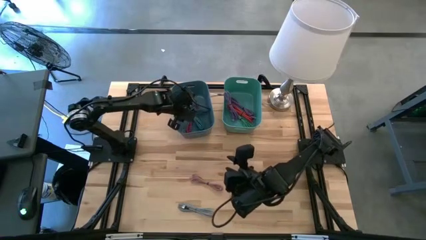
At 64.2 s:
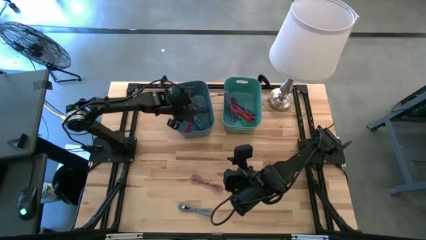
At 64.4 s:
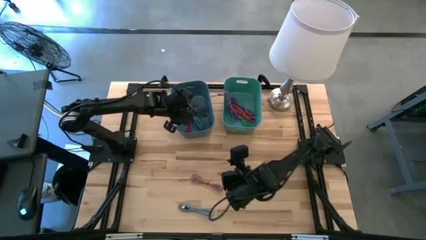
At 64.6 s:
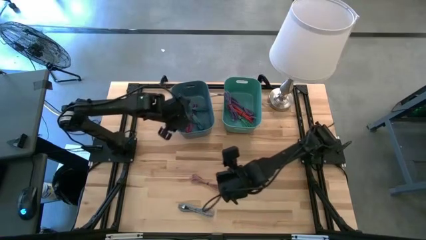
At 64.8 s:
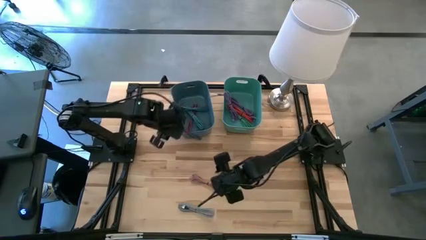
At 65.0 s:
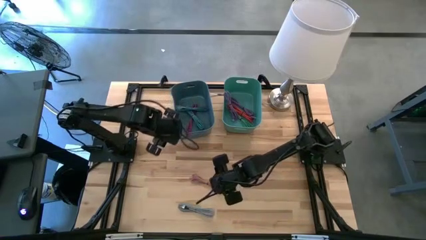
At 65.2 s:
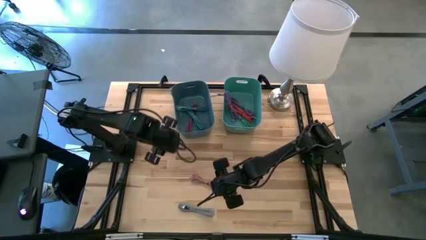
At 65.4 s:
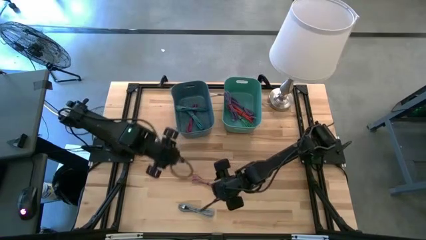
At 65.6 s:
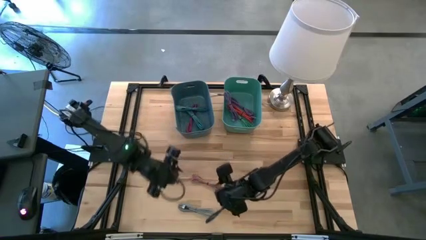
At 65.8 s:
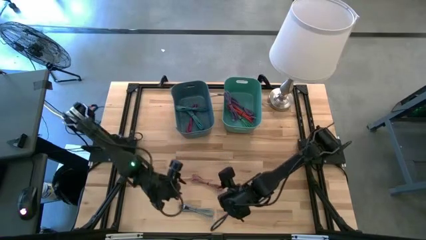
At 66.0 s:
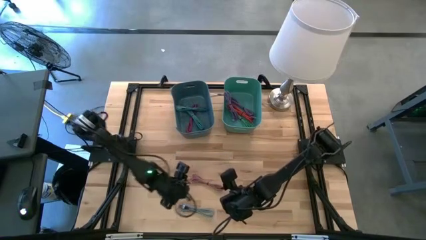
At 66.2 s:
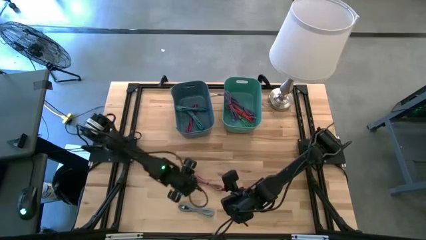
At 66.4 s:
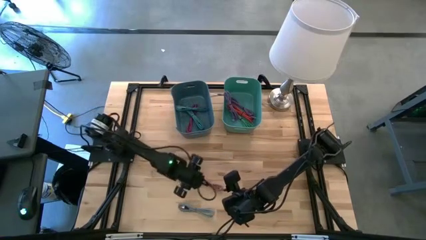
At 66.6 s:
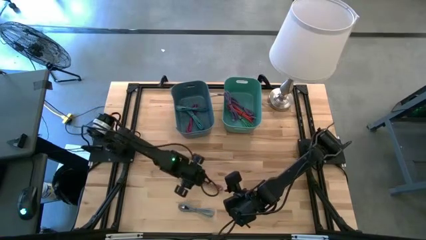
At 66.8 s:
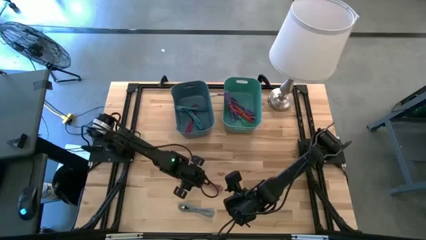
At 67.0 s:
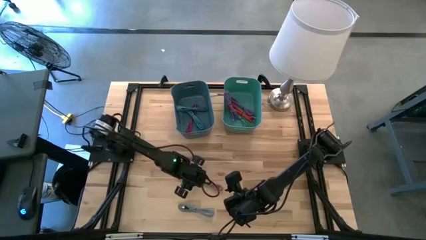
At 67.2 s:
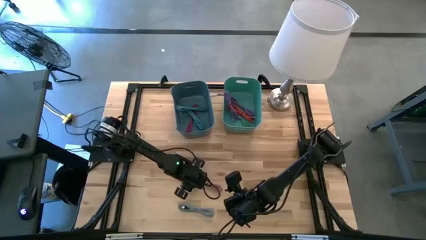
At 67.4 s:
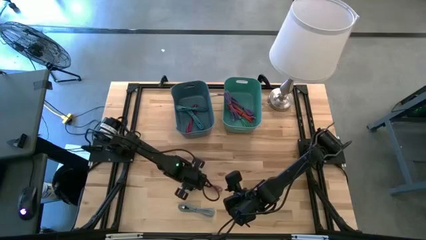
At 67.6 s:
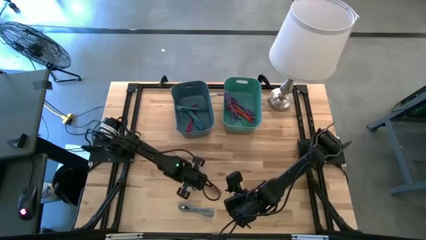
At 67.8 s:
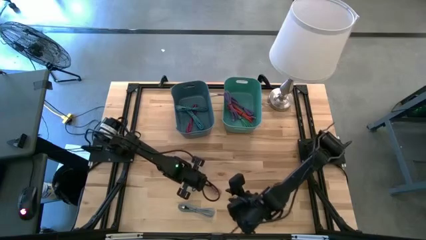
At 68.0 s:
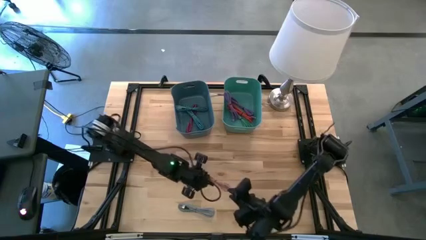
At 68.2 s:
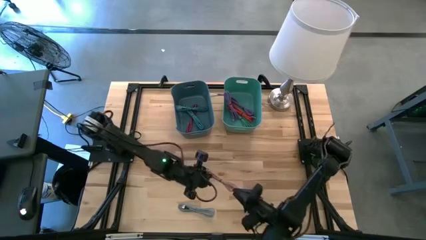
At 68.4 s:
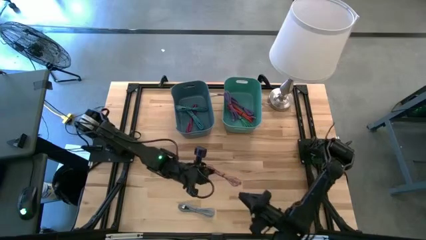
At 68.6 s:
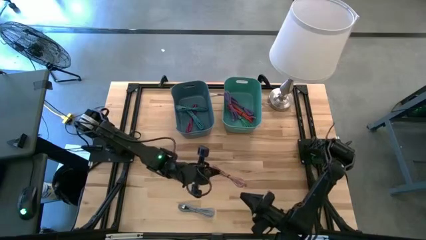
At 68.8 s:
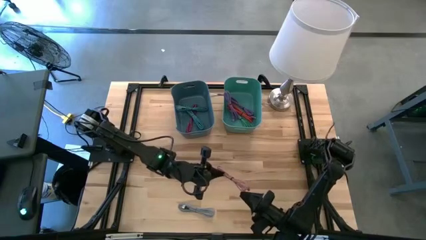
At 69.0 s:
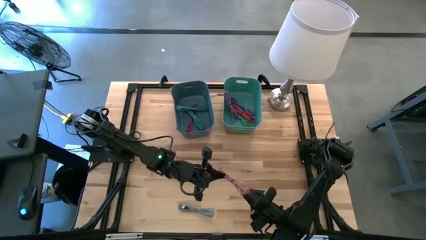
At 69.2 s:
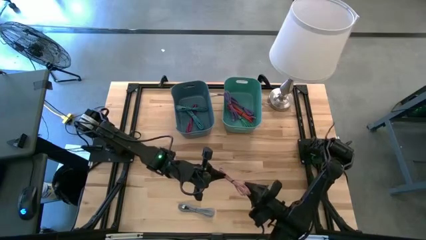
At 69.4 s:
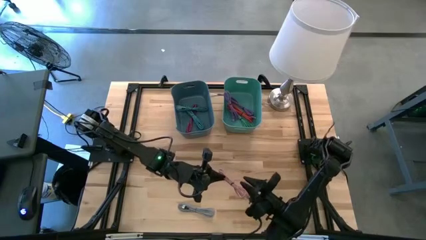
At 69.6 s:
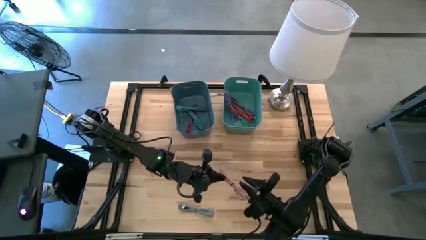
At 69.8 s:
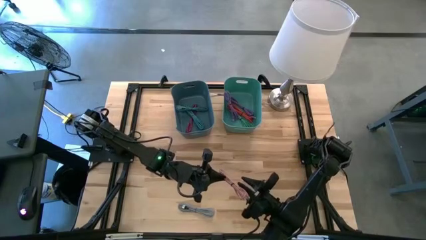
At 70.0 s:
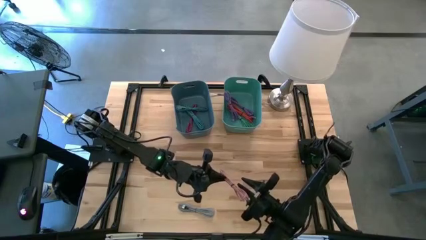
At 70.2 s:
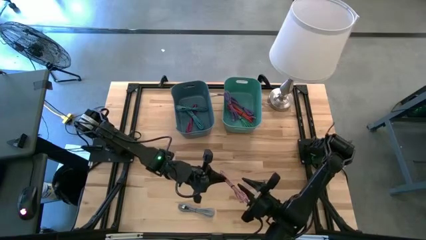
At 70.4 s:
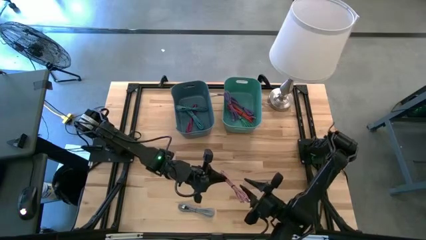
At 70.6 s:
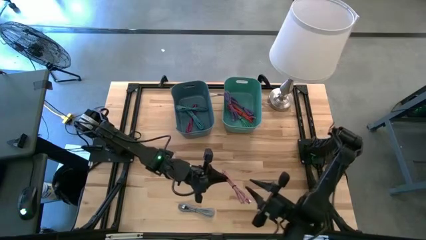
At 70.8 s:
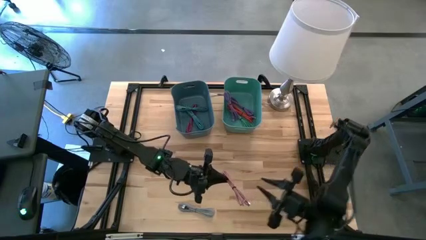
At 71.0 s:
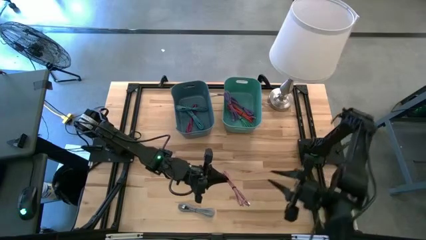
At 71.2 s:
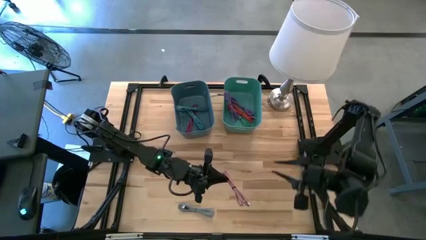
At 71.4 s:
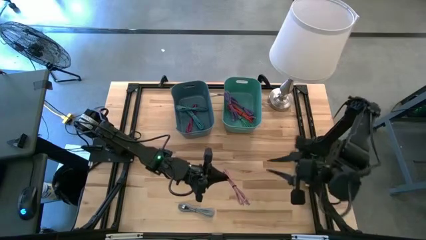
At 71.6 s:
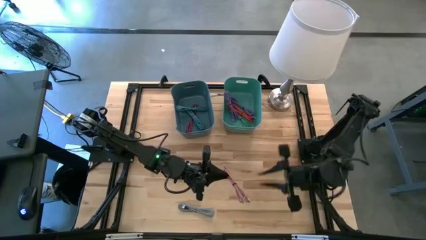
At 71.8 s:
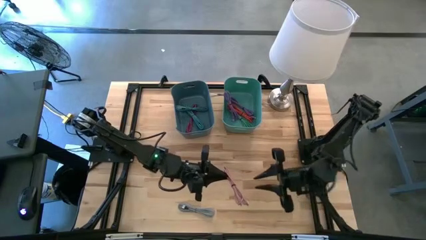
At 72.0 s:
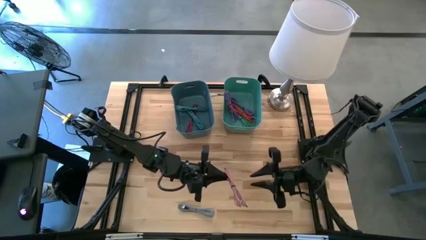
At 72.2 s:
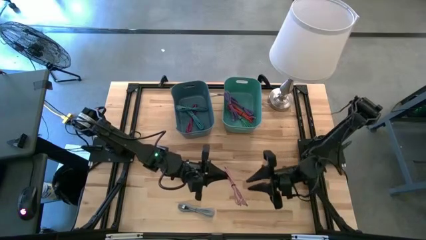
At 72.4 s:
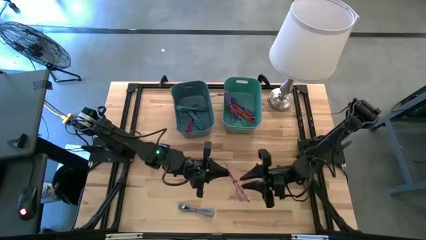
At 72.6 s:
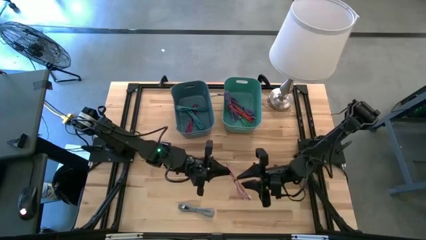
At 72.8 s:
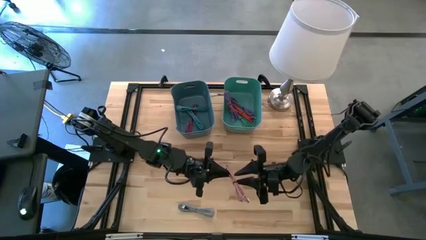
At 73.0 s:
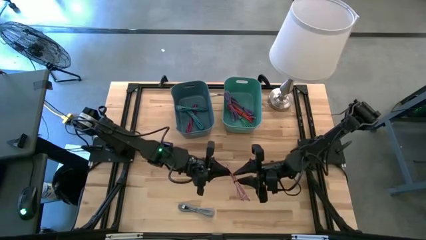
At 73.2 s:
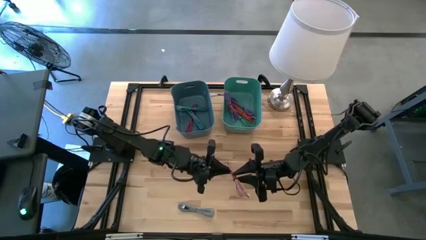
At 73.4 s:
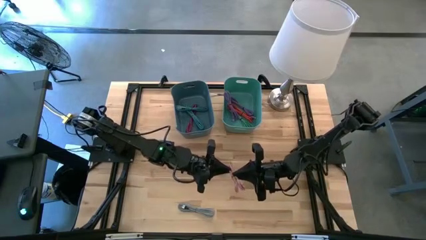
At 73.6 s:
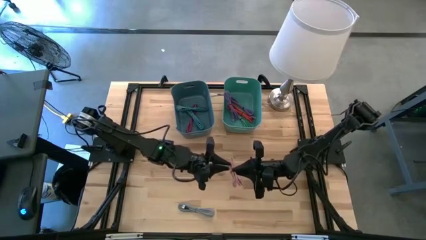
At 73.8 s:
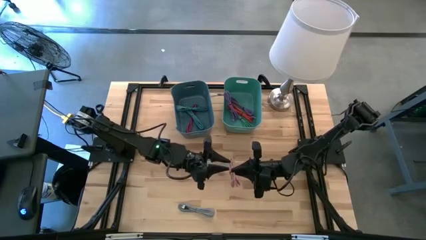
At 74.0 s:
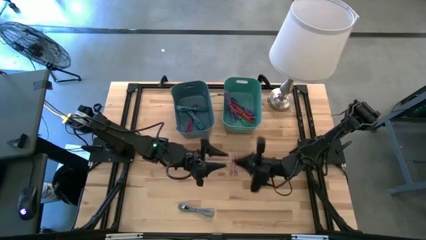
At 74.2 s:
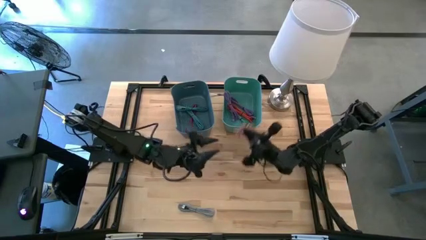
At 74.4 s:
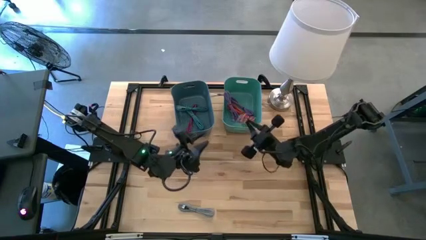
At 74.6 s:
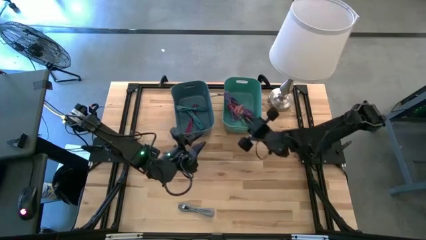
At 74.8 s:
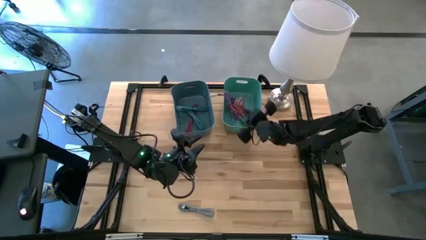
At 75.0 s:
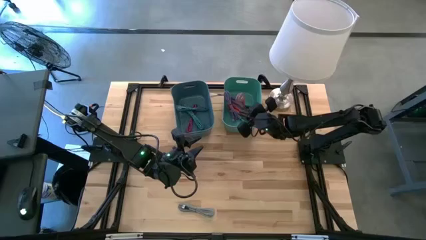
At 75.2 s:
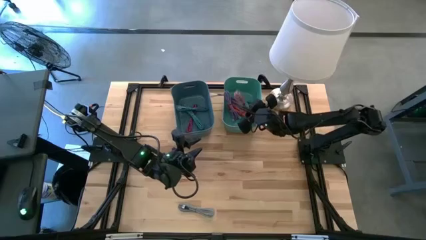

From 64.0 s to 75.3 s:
Task: Pick & Place USB Port
Put the pink charger cable into the green bin

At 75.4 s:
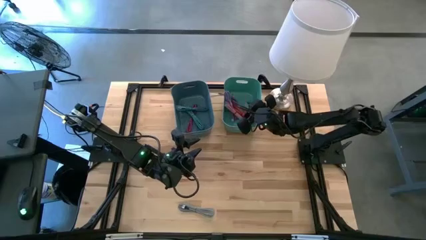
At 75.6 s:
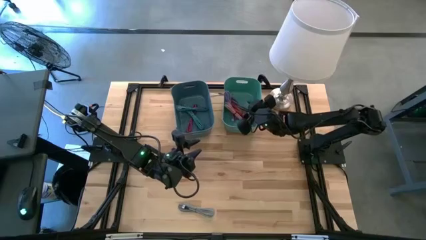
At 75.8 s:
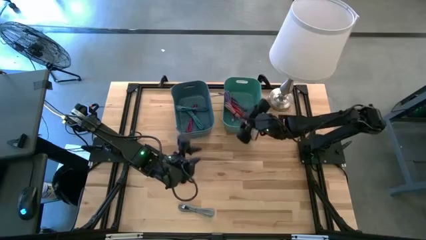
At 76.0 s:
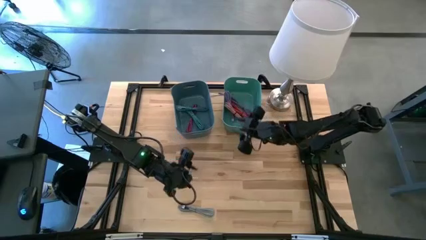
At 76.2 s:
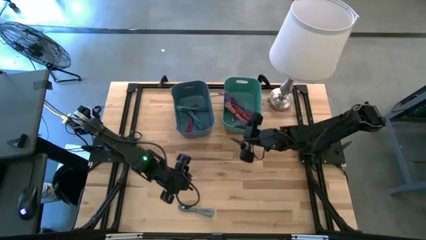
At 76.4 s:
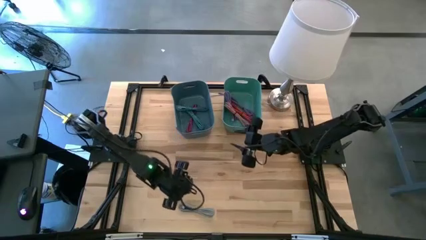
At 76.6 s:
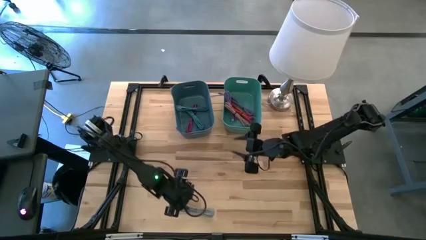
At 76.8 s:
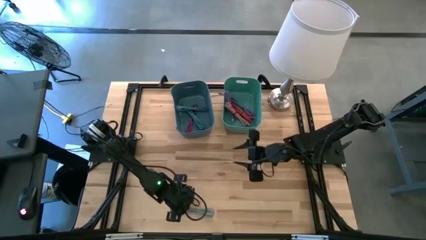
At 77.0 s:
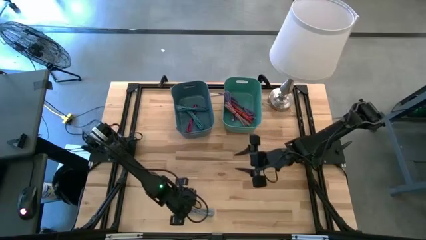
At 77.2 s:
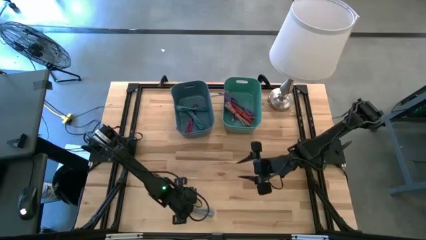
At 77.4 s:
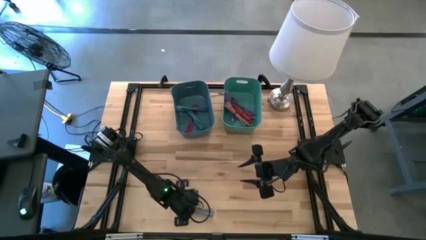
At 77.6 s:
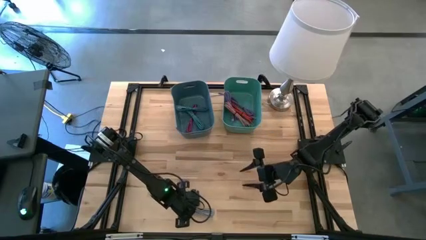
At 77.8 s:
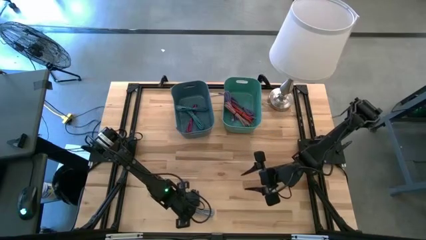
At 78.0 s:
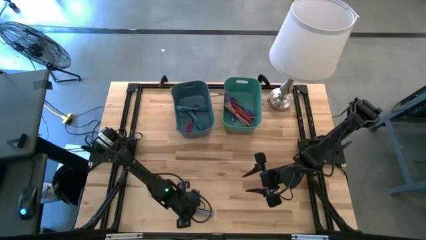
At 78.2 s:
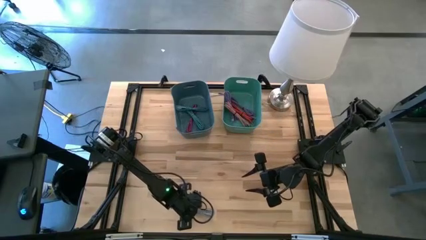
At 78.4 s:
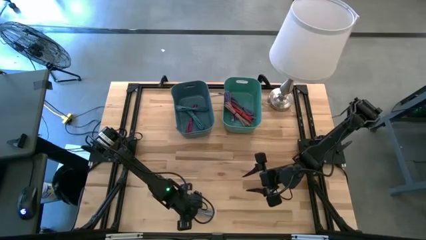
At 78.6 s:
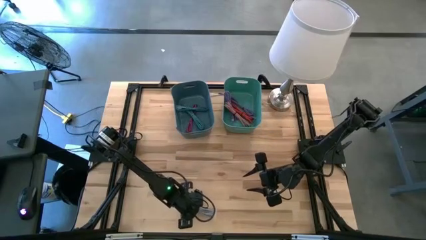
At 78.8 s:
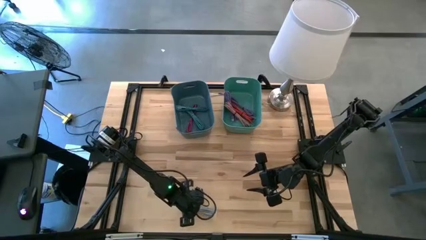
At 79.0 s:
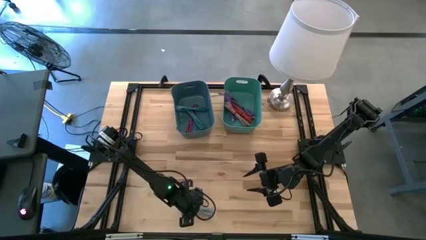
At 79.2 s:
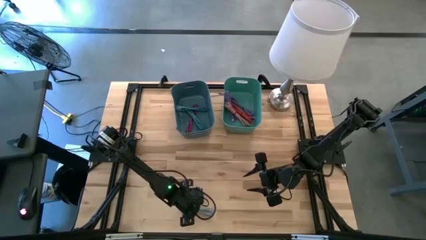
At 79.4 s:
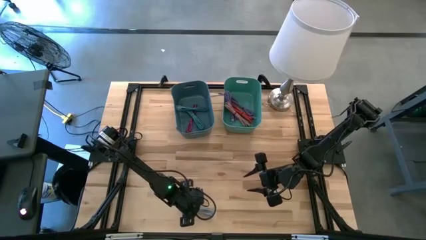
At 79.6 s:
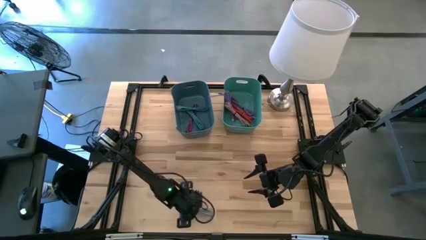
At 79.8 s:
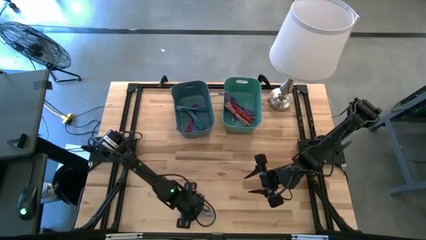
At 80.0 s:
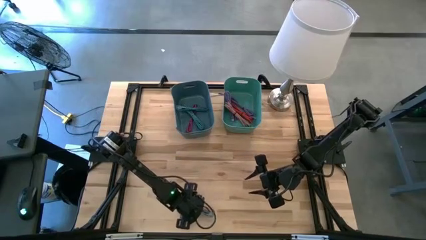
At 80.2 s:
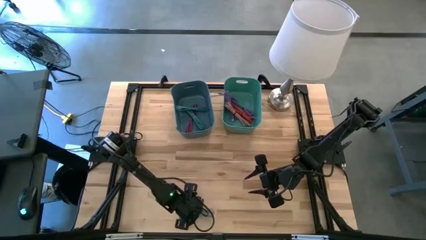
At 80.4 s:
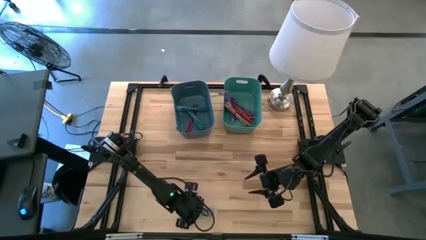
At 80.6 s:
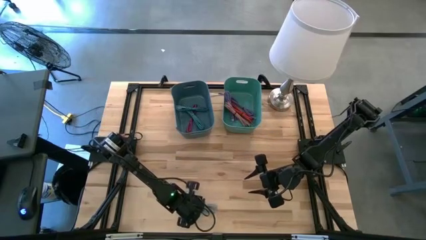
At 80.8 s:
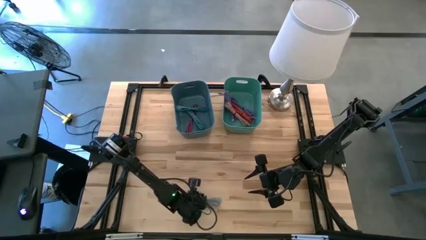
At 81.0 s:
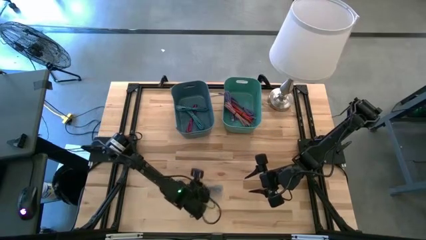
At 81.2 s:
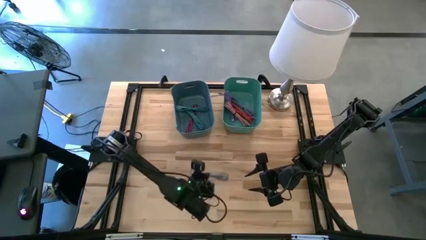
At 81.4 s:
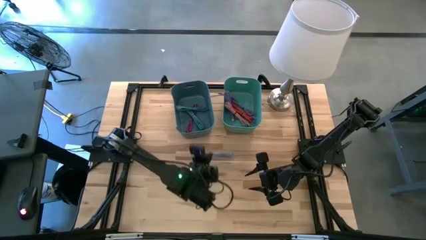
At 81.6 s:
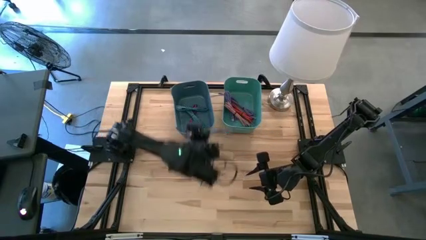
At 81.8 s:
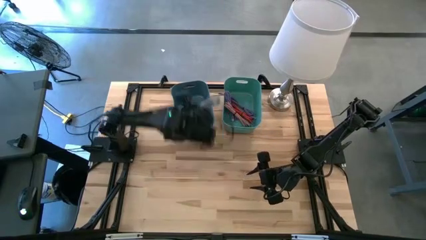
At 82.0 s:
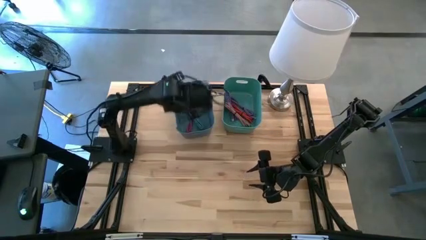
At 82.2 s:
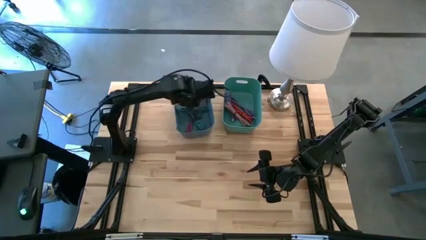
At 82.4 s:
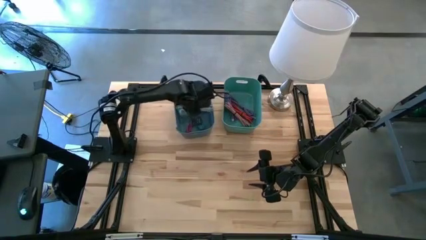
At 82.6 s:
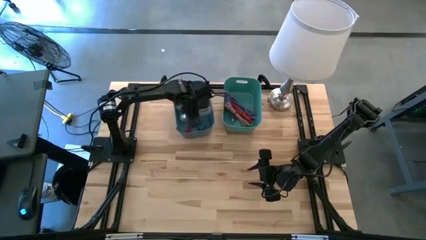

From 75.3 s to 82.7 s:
Put the black and white charger cable into the blue bin
